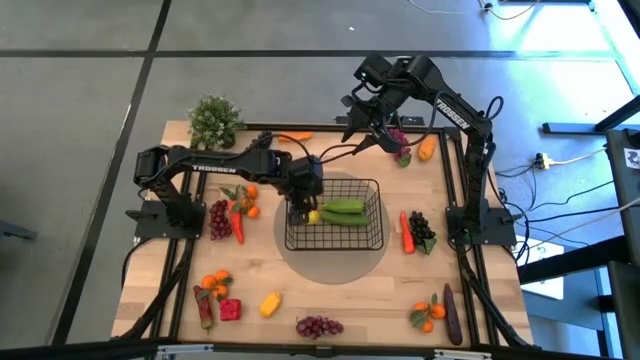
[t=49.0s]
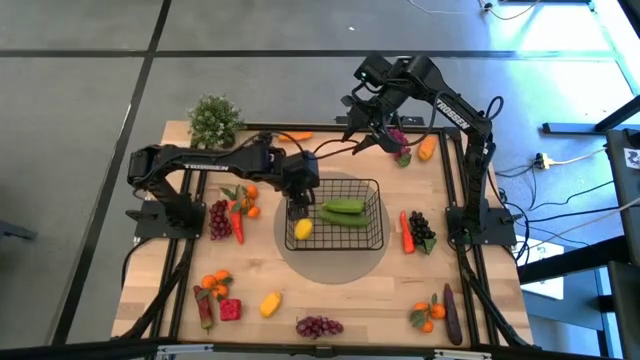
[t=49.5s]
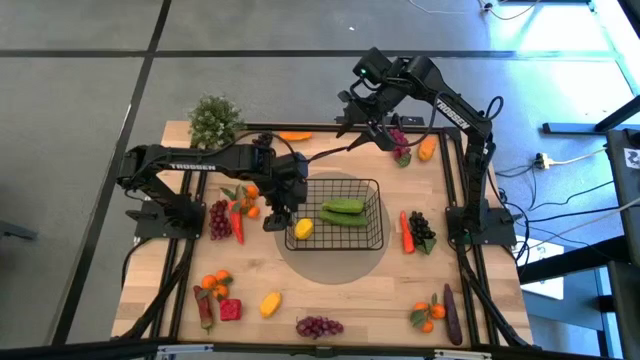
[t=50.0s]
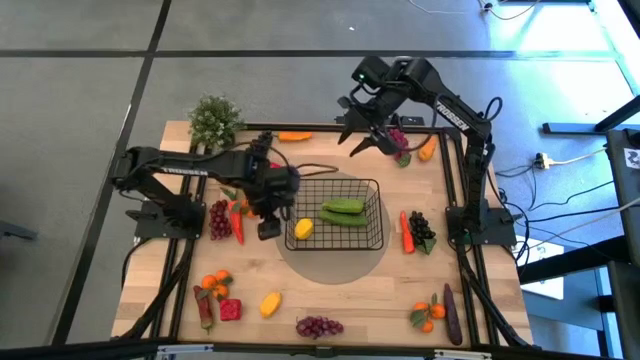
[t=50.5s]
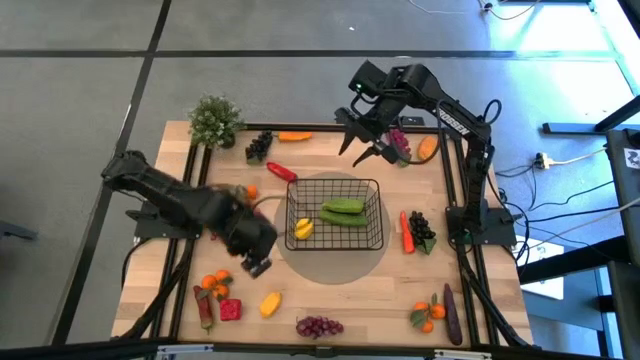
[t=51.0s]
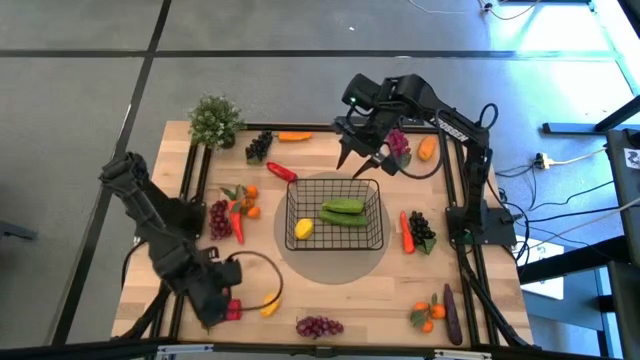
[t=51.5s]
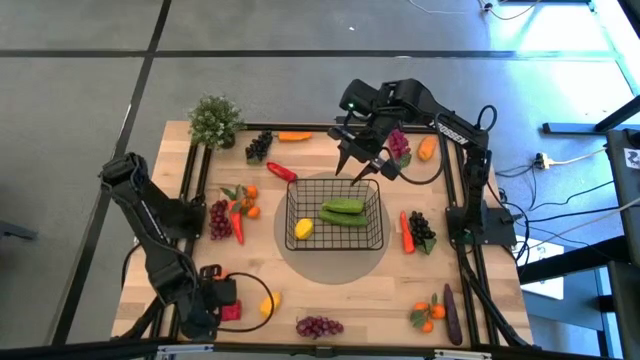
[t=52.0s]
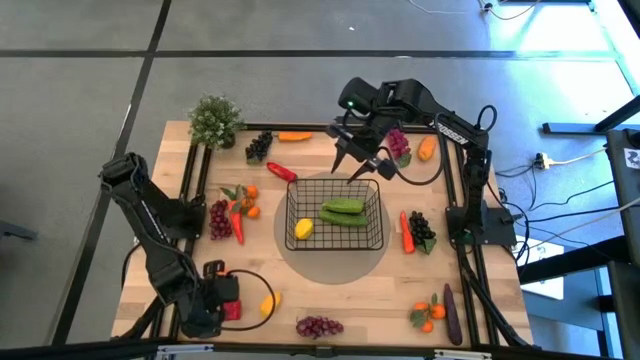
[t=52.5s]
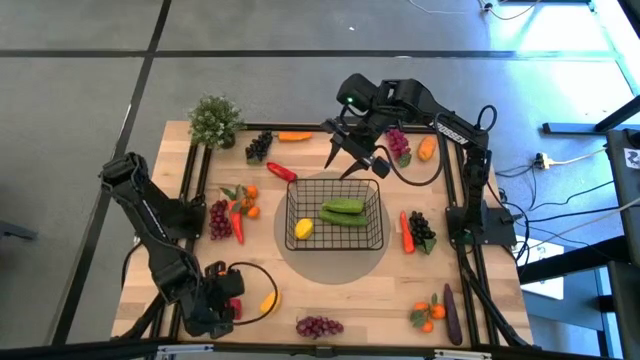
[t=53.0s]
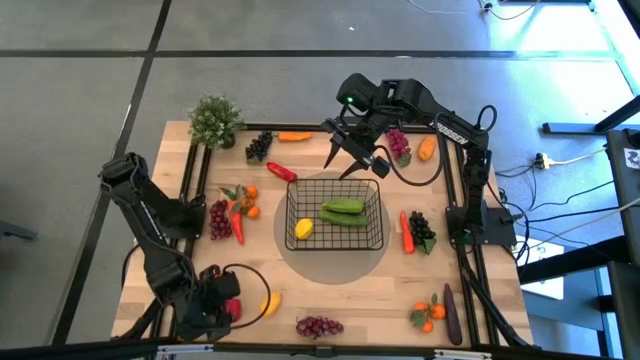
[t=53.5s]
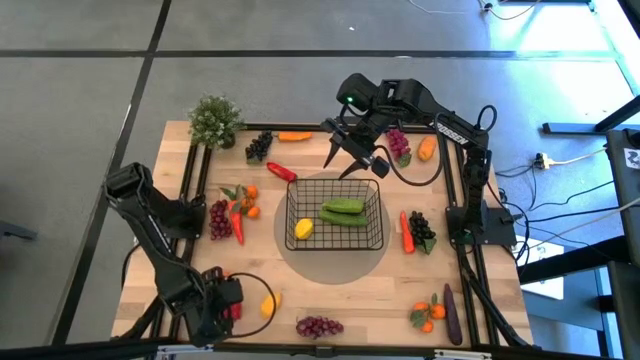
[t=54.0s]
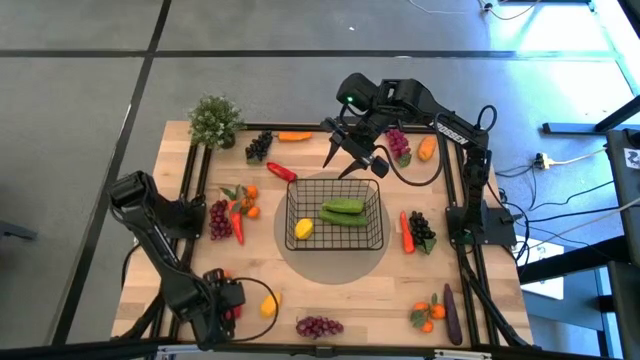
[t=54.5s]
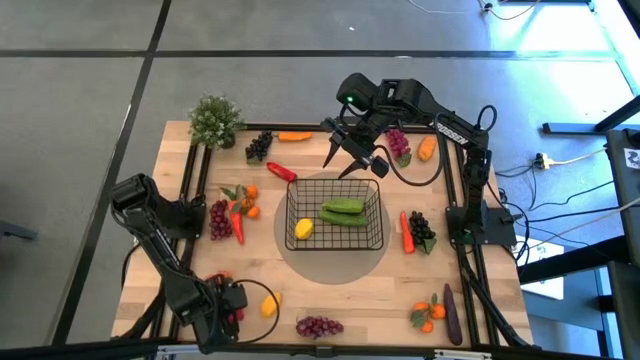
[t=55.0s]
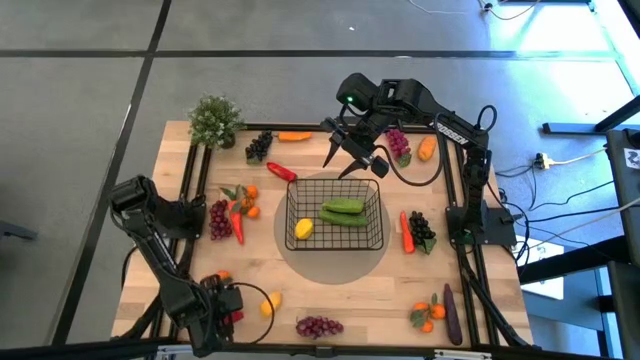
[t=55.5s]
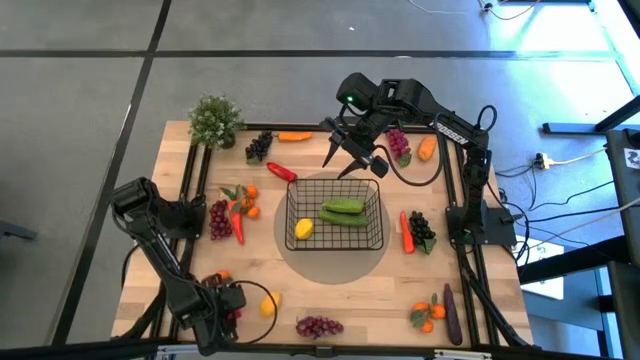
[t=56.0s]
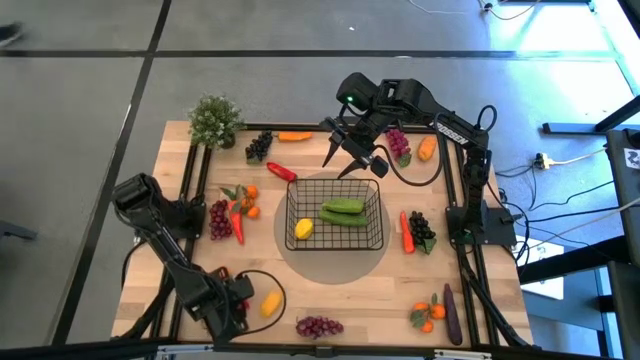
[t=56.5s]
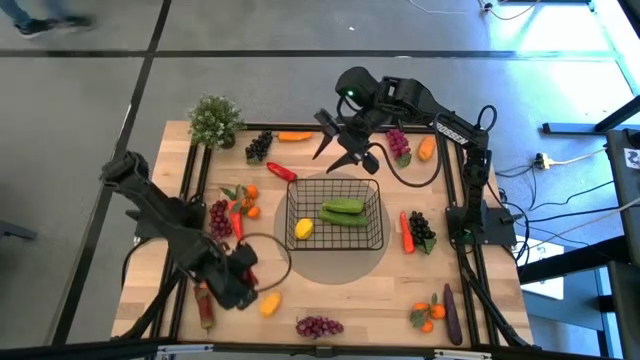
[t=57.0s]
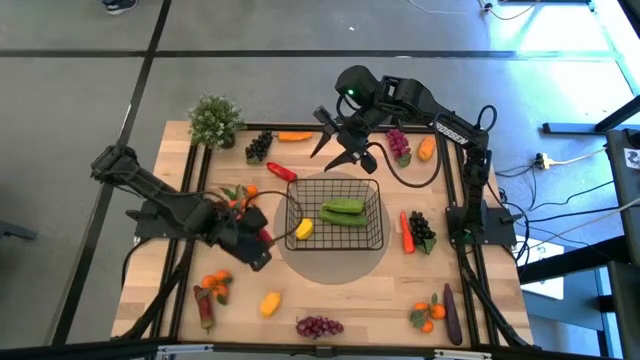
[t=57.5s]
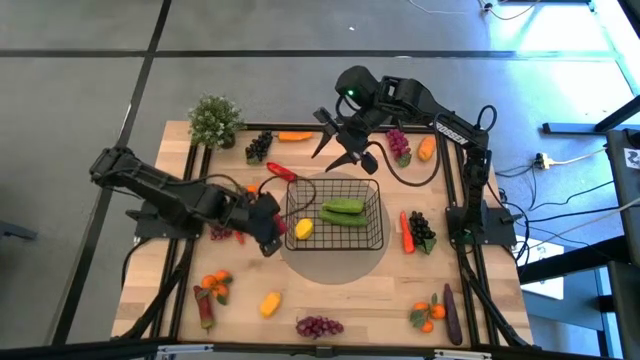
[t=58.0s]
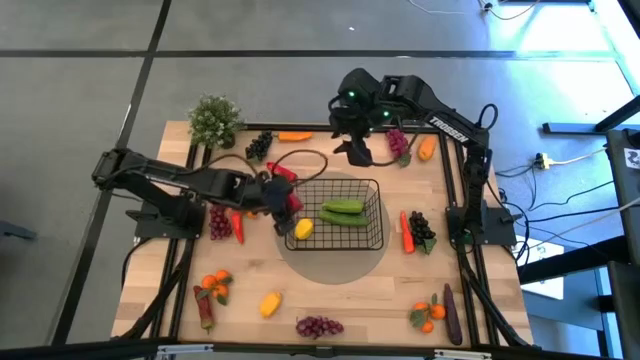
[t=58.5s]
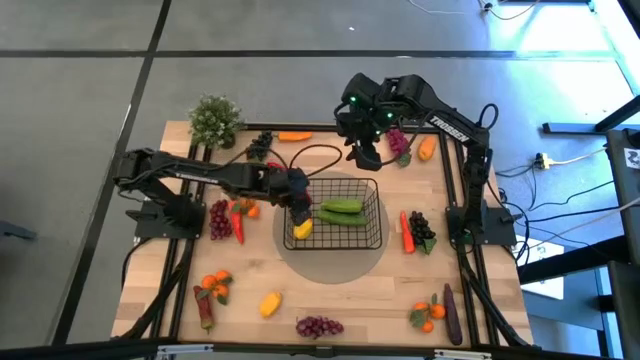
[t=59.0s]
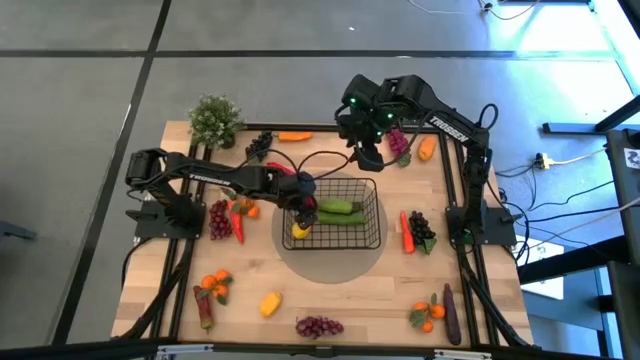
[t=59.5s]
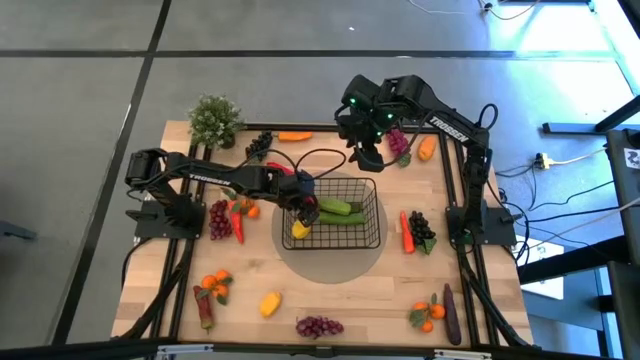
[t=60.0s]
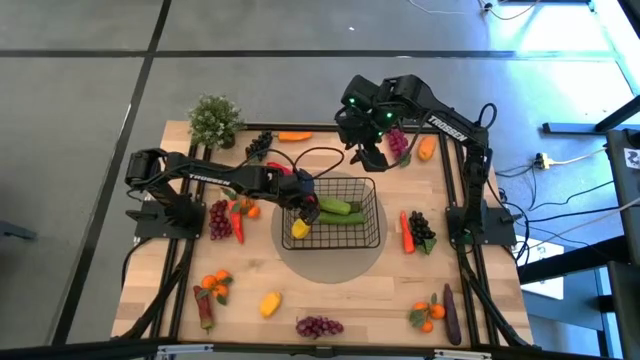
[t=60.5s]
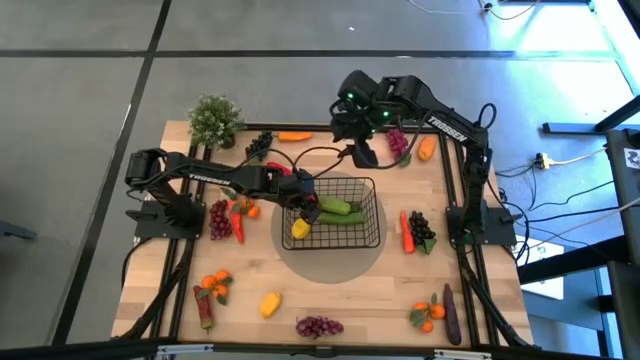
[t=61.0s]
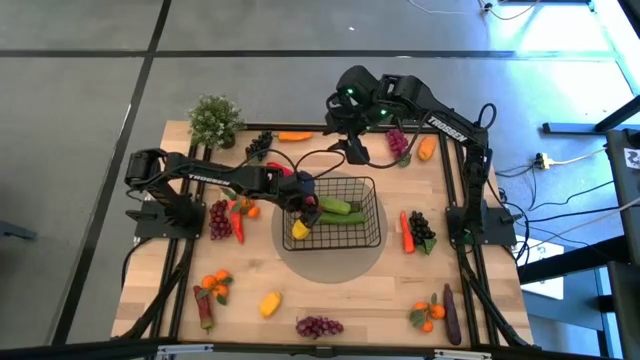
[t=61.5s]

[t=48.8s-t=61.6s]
Task: Build produce basket
Put the red bell pepper into the basket

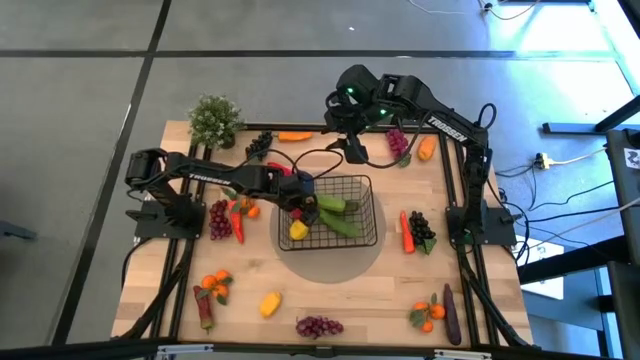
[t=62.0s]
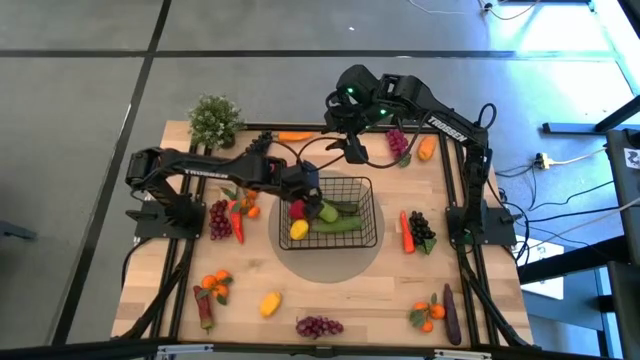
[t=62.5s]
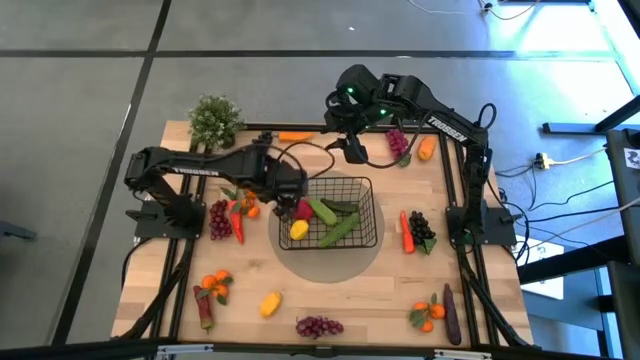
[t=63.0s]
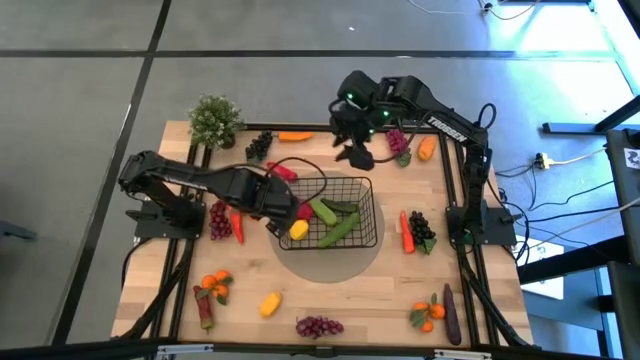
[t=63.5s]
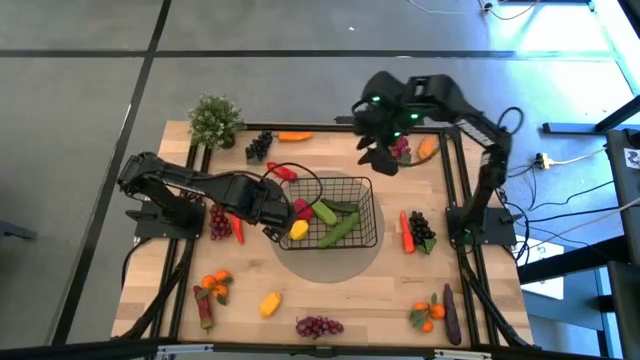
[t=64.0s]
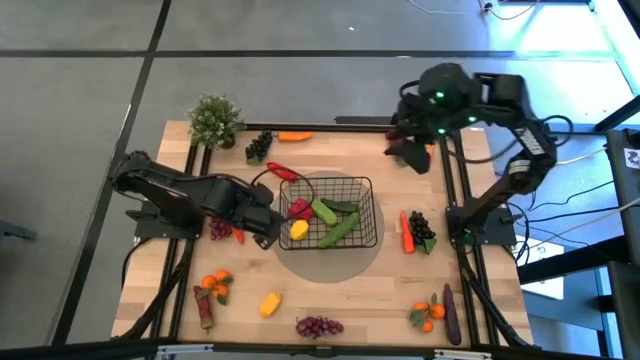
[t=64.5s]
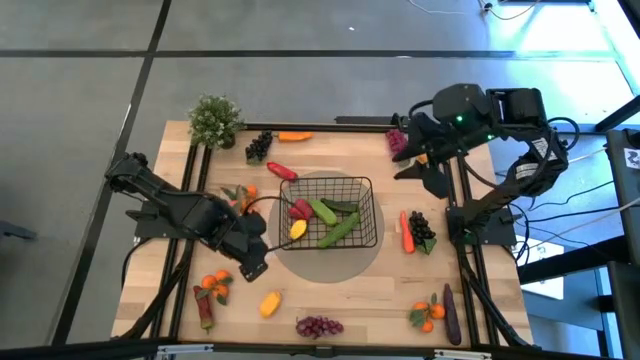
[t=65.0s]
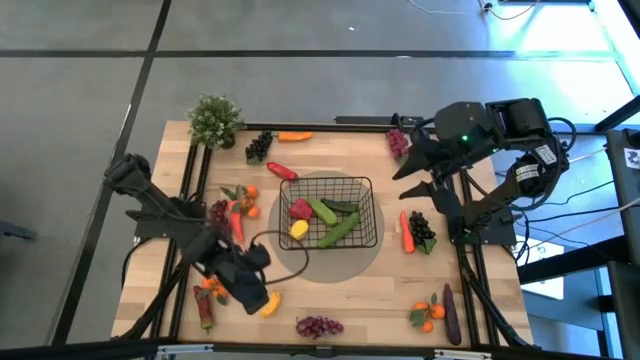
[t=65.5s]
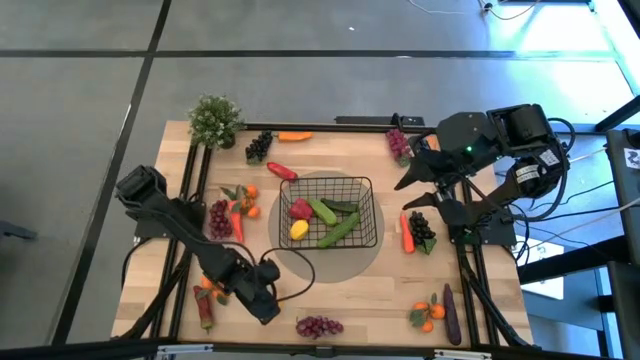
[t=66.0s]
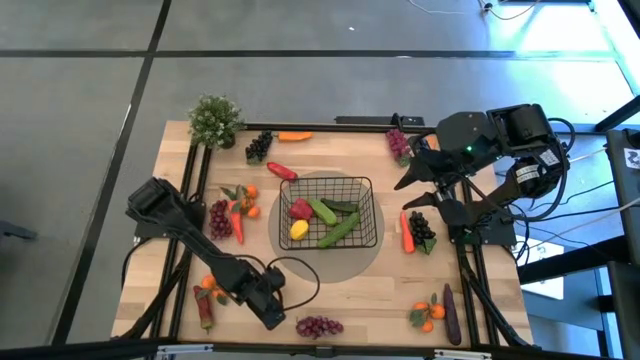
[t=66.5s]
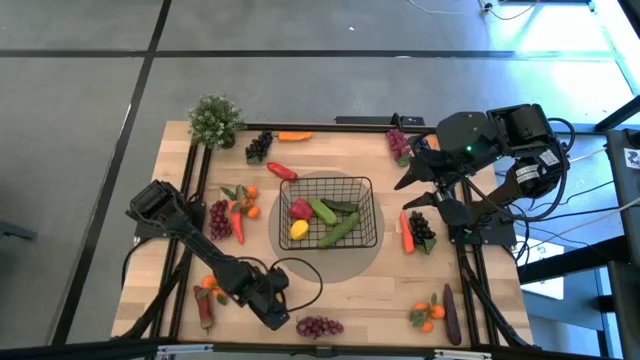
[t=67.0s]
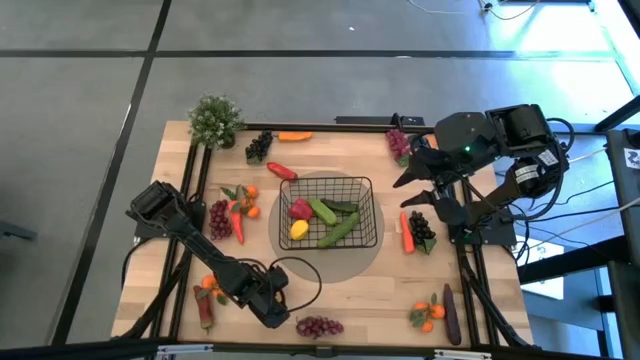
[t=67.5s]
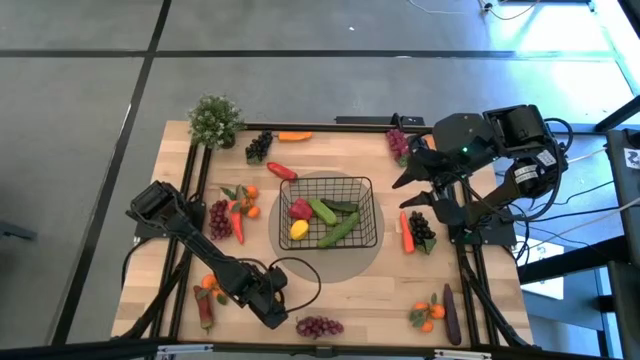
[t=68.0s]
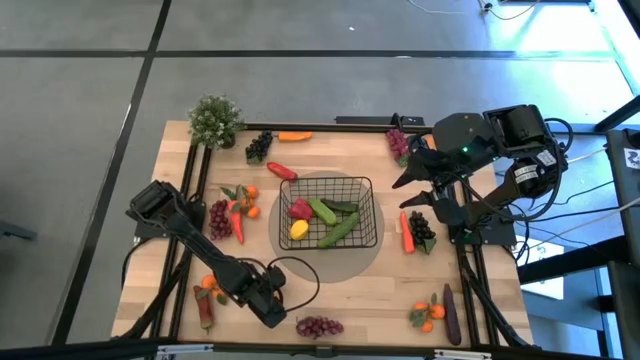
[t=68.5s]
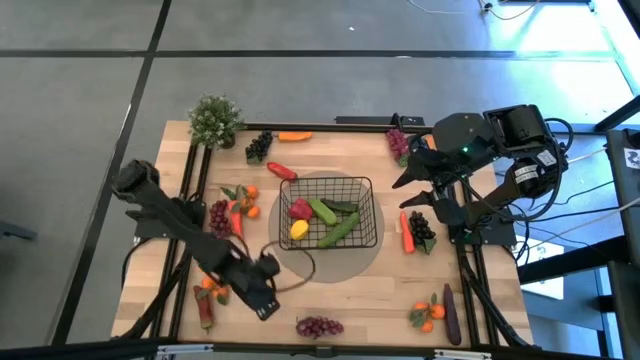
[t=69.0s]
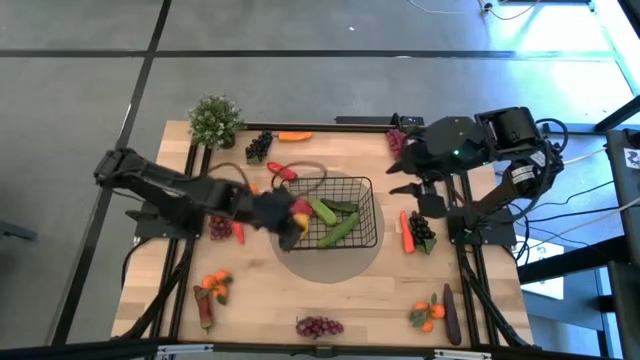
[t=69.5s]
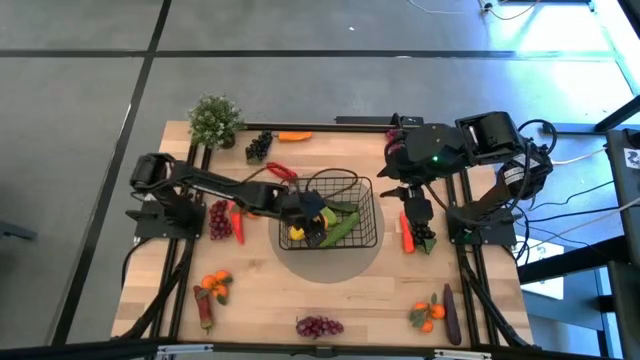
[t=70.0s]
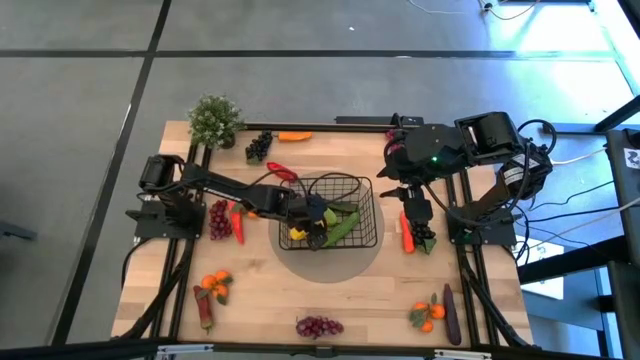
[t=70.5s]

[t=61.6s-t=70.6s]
Put the lemon into the basket
